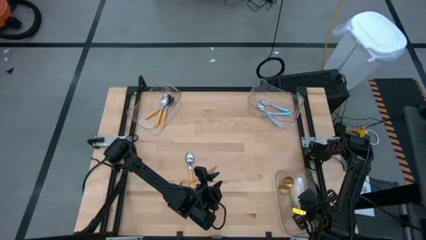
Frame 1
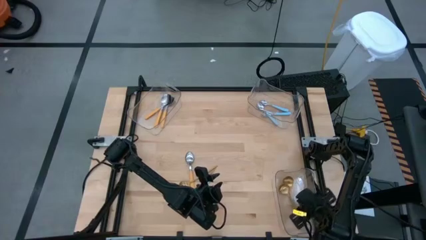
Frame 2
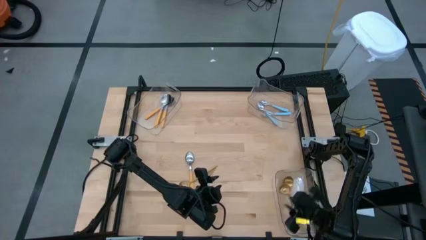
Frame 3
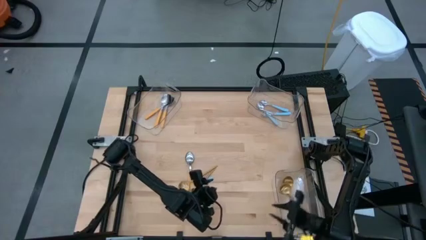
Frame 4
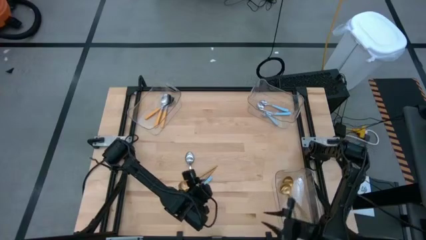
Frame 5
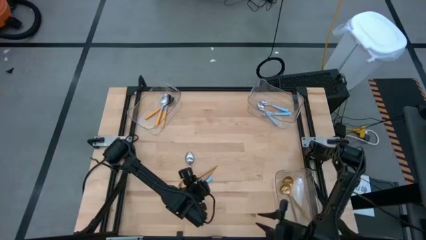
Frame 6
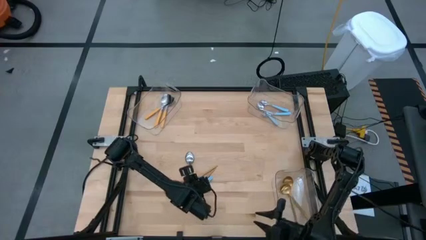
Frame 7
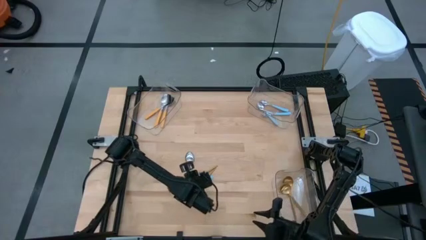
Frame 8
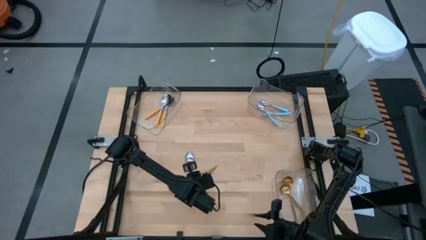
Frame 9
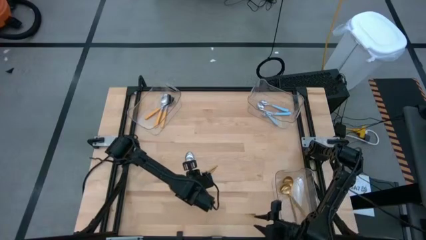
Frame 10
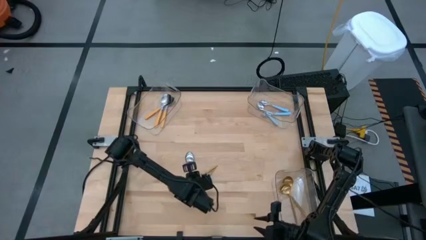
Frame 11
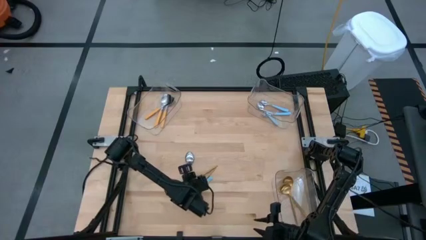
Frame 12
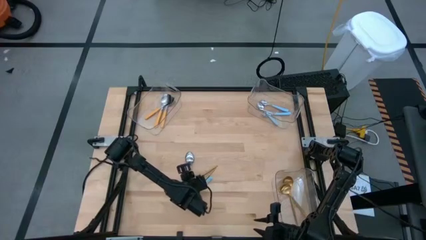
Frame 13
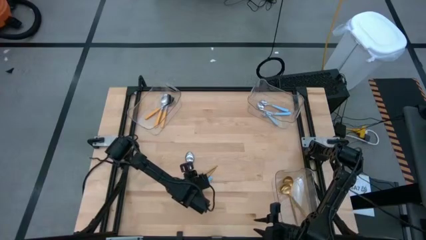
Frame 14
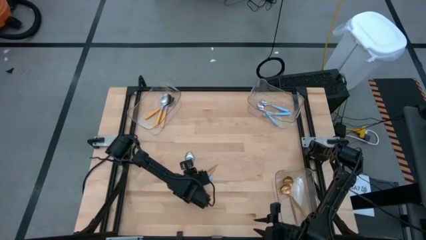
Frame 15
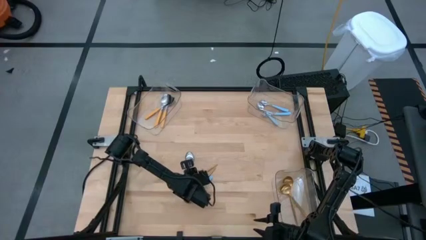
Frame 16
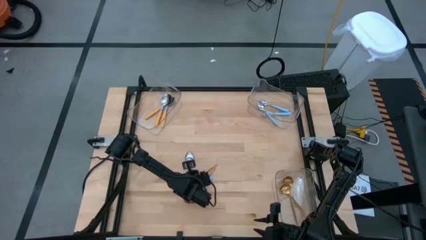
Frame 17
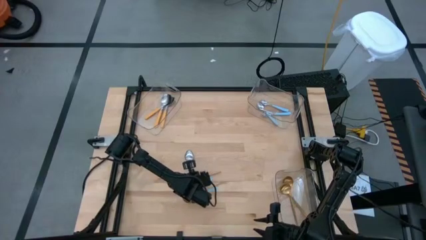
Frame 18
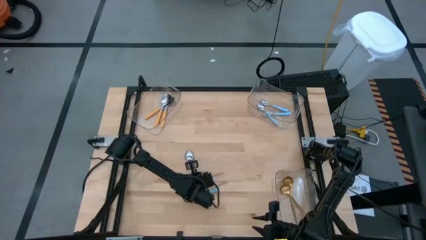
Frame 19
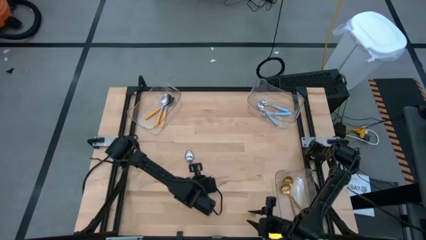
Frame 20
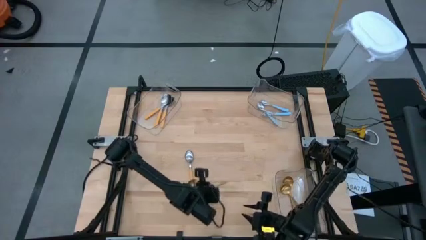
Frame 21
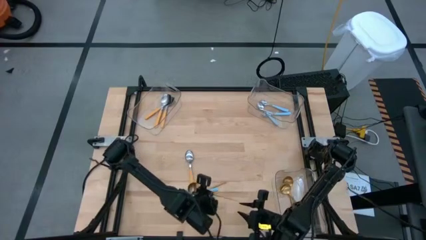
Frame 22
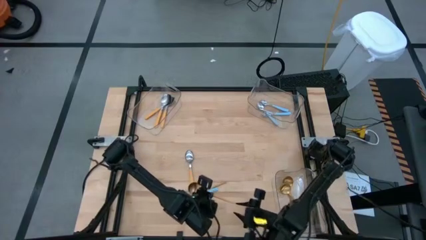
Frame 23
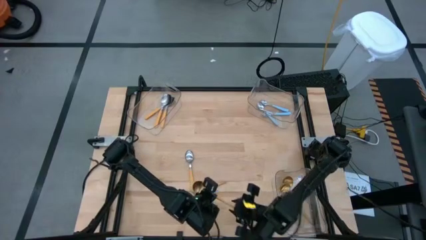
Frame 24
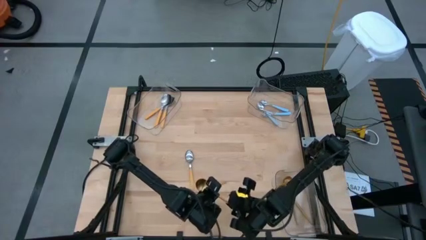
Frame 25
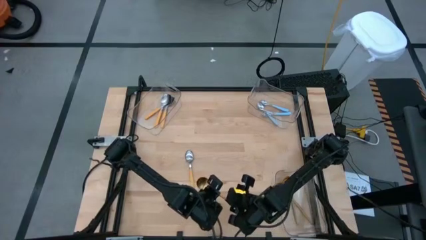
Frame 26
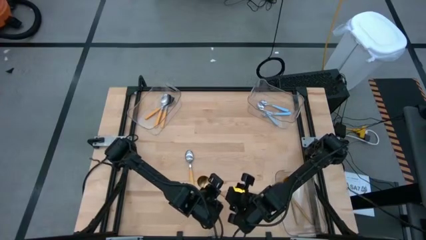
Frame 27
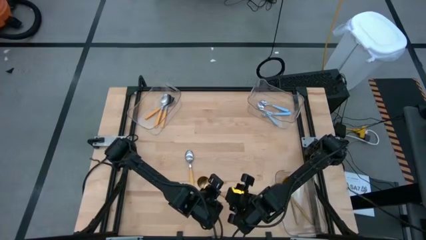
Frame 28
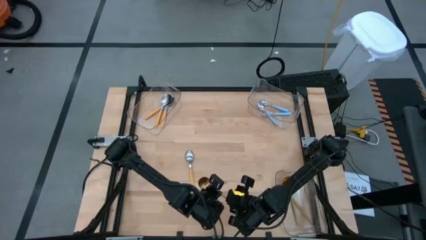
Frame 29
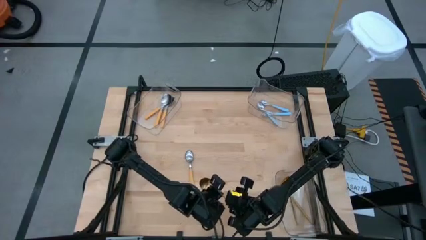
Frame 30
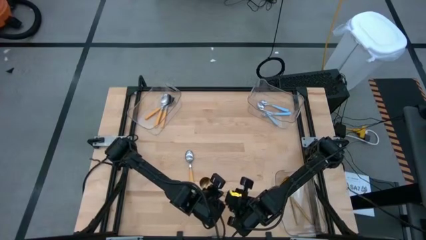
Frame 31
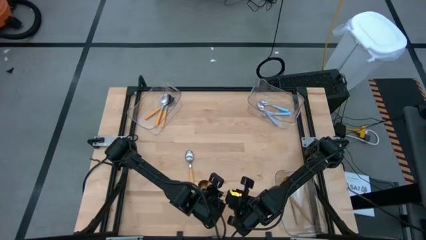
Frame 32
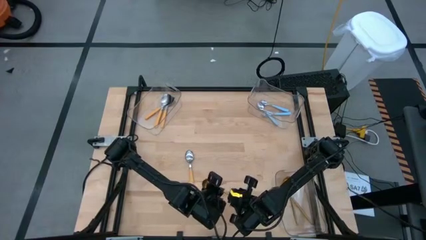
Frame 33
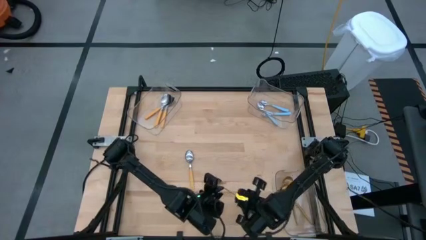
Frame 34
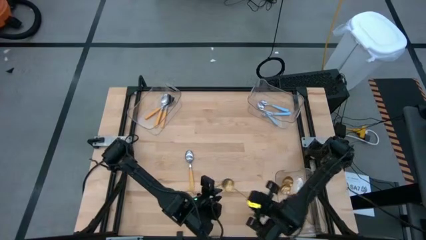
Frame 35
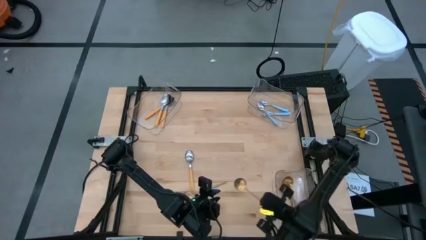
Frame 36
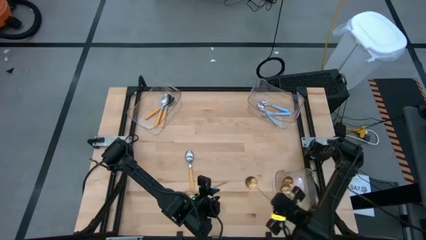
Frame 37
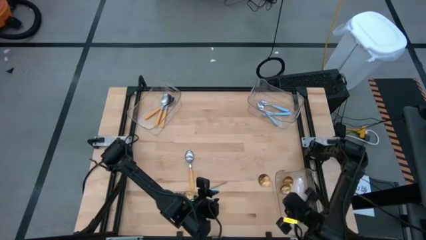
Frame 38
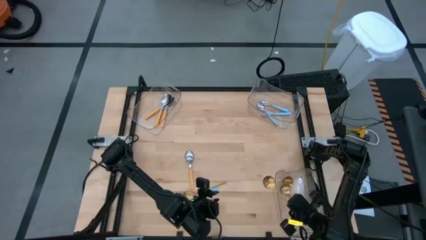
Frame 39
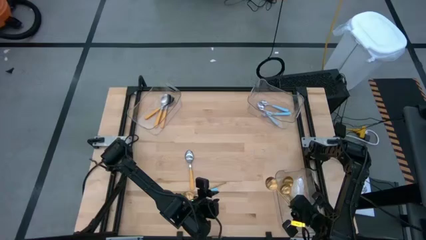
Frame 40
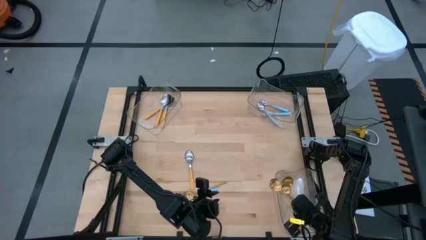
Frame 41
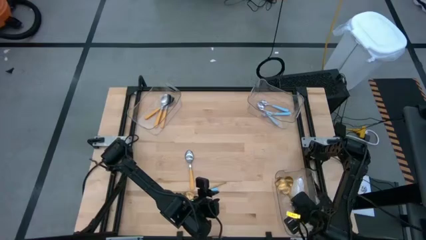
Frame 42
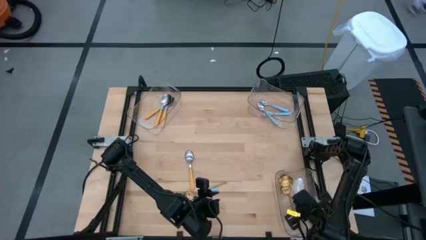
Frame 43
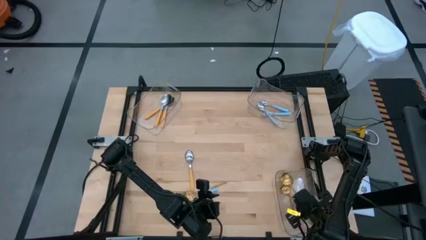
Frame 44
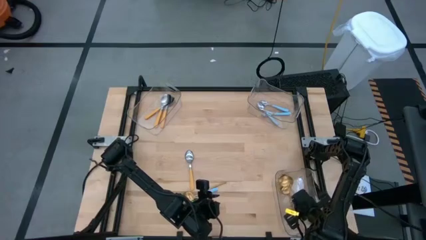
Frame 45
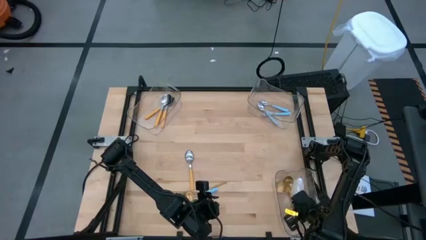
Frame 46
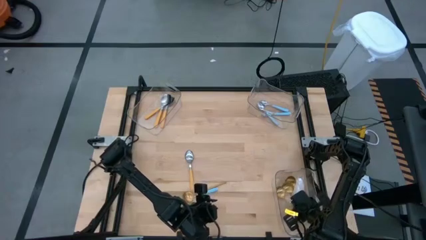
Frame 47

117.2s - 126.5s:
Task: Sort silverware by color (type)
Put the gold spoon into the bottom transparent bin

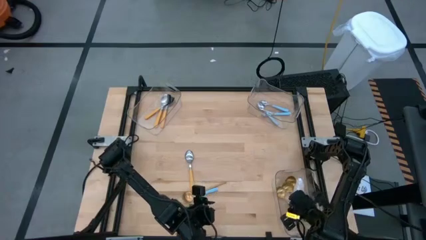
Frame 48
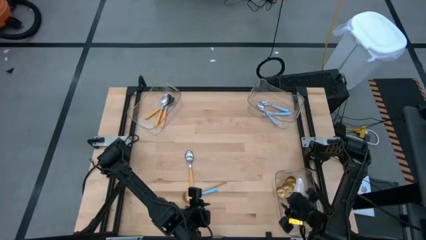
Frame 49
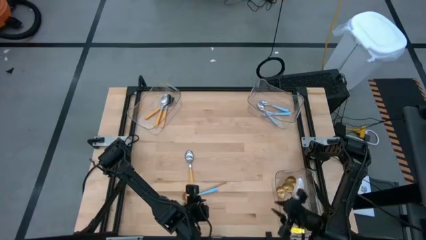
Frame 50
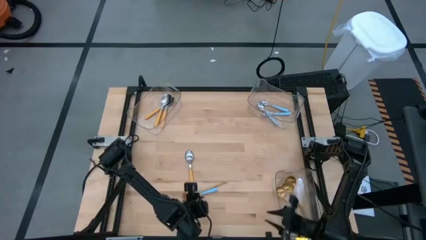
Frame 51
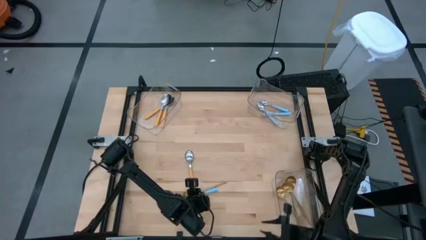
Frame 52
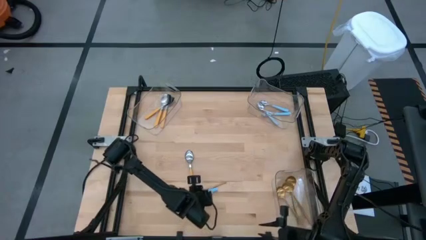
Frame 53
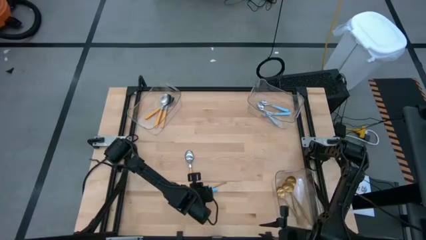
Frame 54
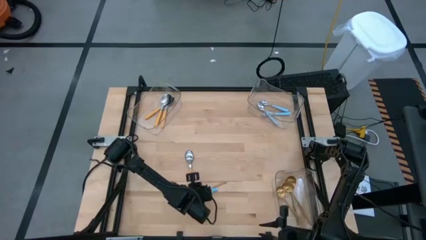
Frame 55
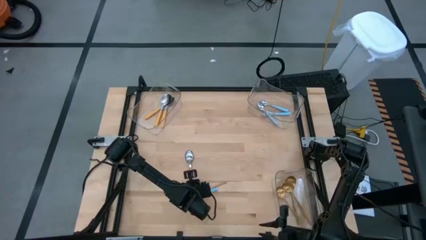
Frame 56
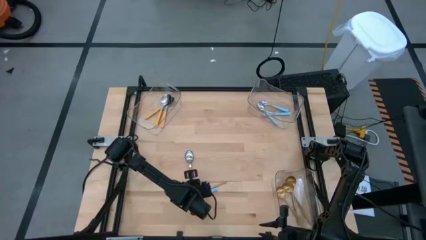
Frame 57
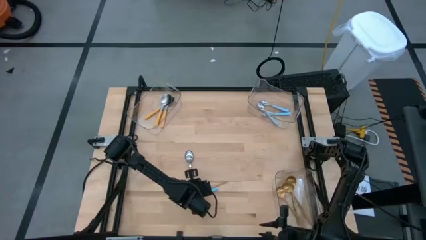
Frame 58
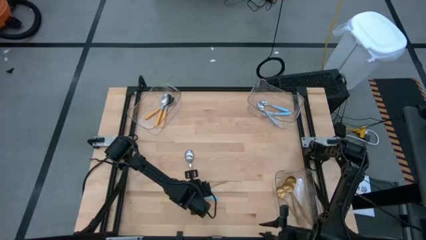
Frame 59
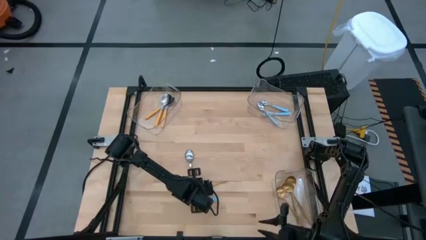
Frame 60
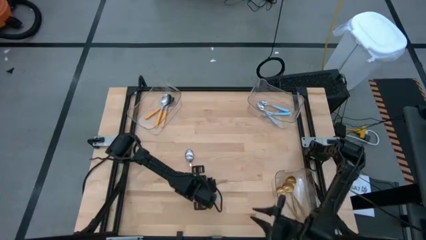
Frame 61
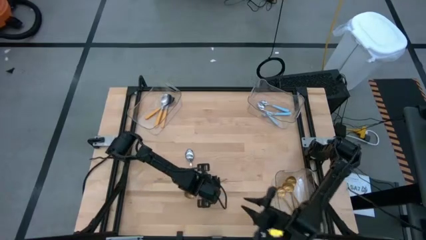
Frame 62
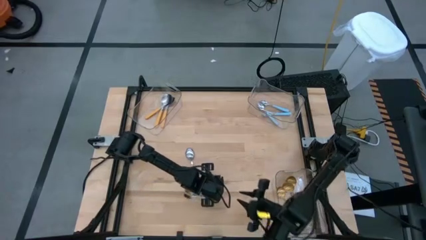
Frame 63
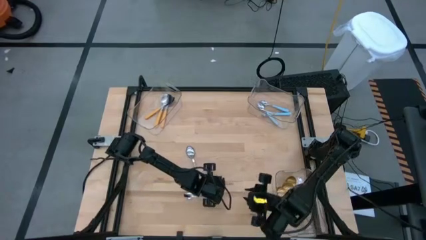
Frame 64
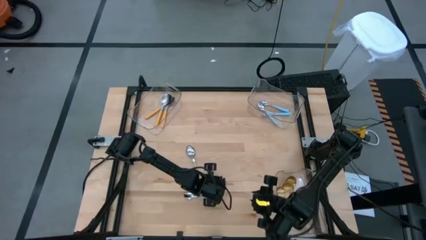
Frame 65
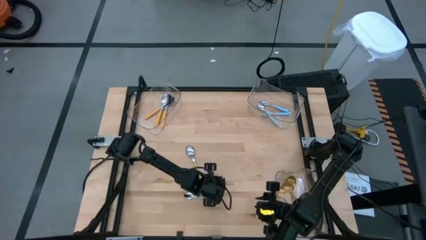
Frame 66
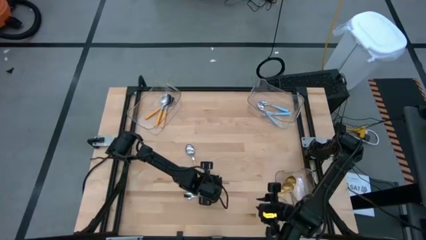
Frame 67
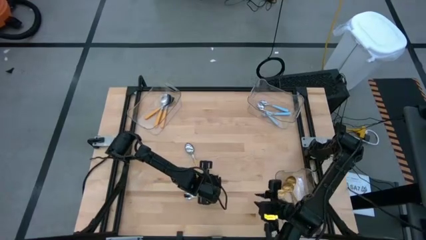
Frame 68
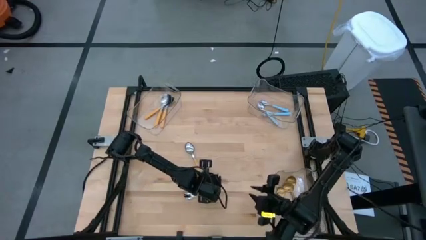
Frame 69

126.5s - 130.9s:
Put the gold spoon into the bottom transparent bin

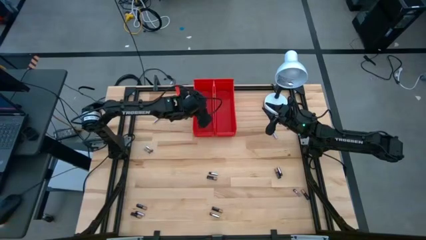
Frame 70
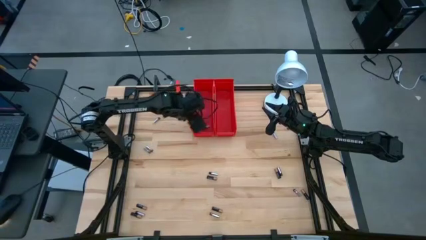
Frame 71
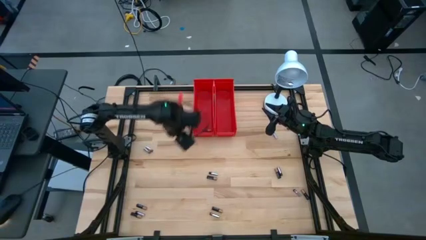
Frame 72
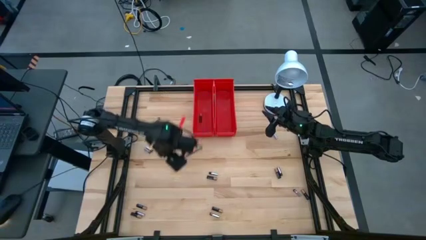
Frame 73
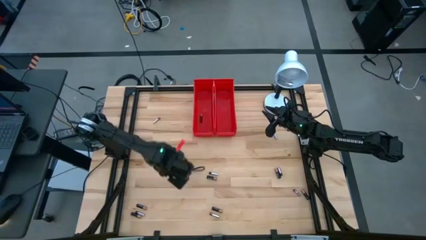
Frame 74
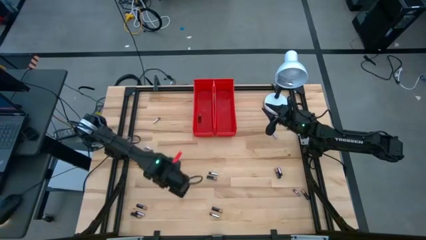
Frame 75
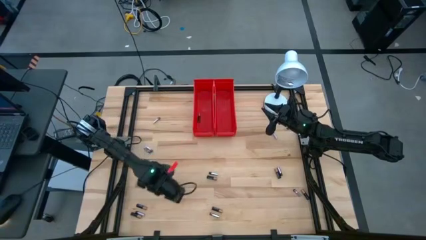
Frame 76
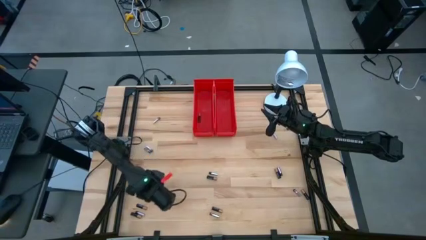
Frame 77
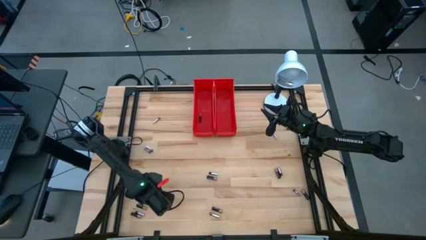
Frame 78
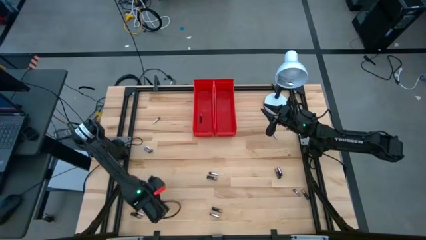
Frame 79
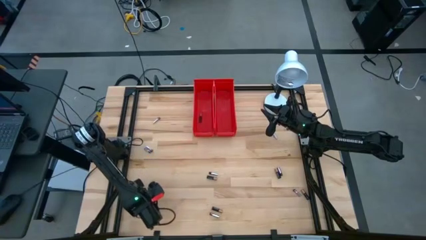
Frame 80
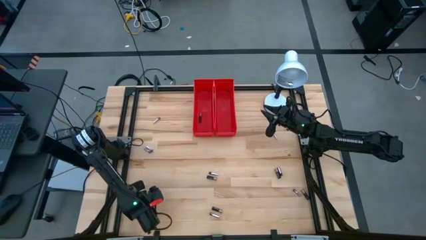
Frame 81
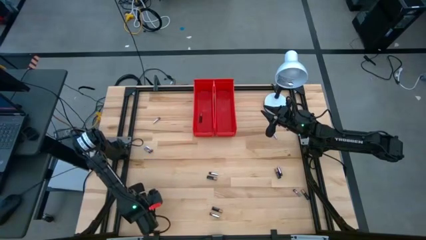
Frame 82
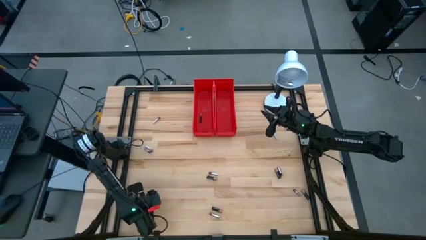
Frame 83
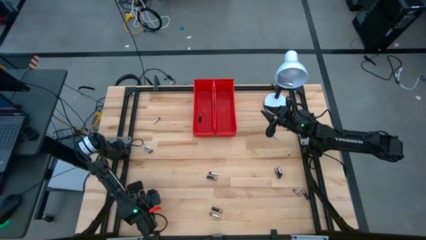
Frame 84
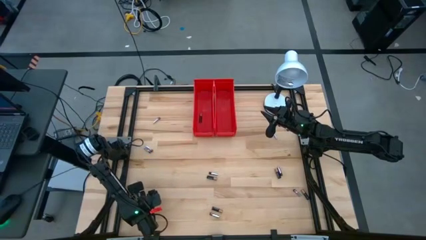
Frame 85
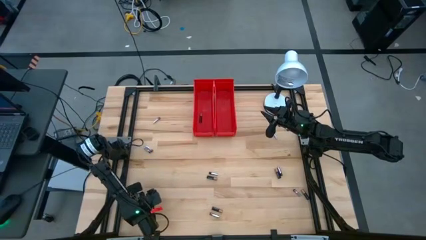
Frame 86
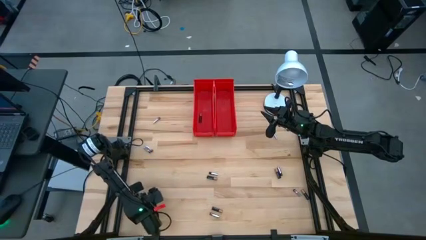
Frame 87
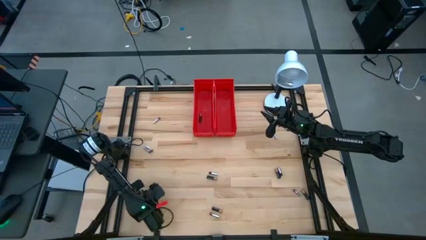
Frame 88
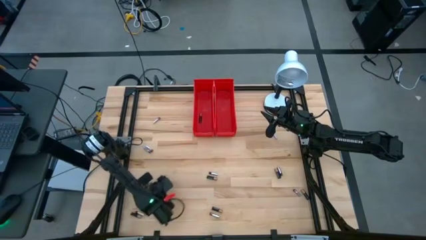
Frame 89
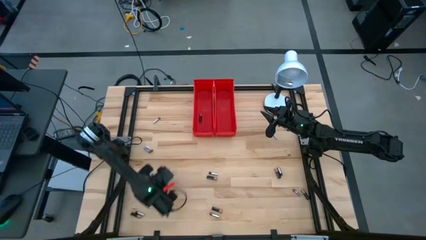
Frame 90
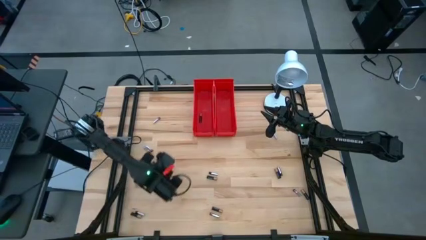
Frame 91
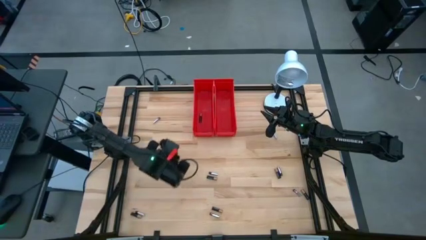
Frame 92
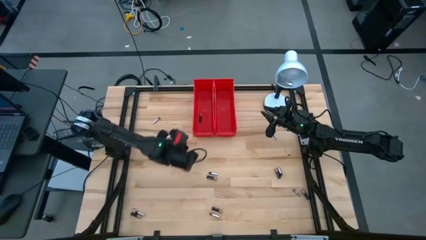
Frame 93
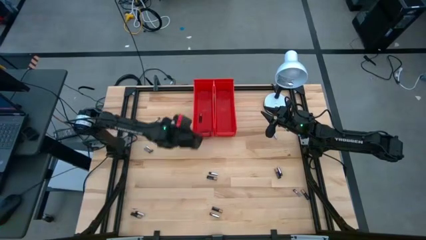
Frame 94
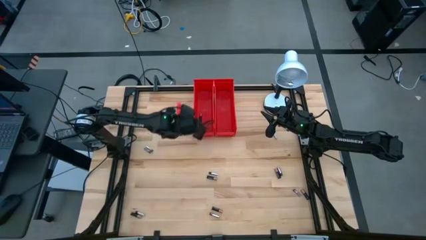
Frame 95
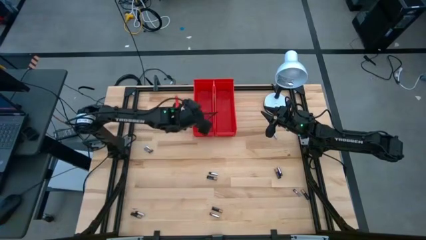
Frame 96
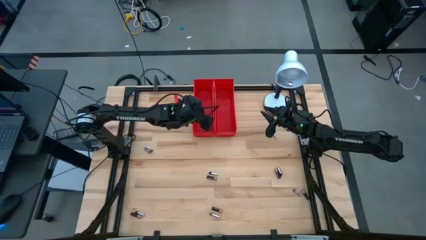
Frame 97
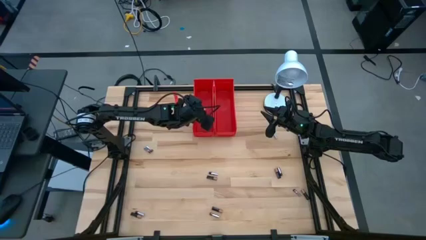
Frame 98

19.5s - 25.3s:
Task: Sort batteries
Put the black battery into the left red bin
